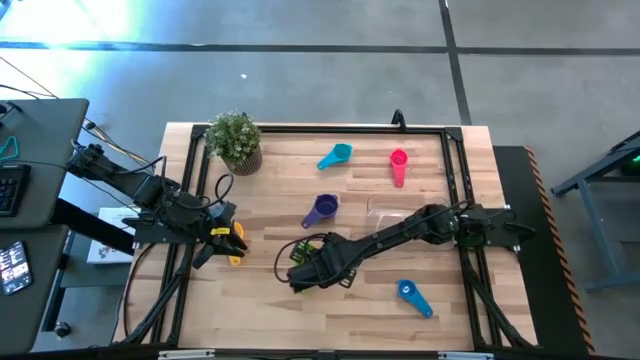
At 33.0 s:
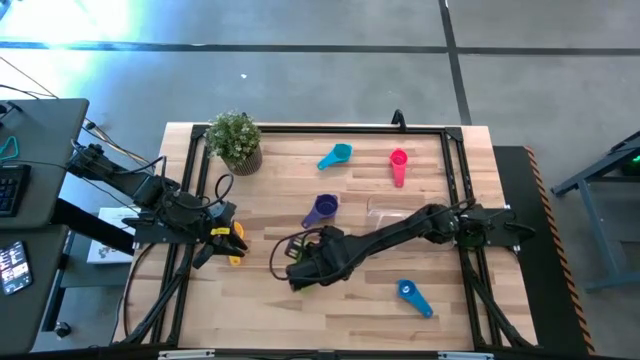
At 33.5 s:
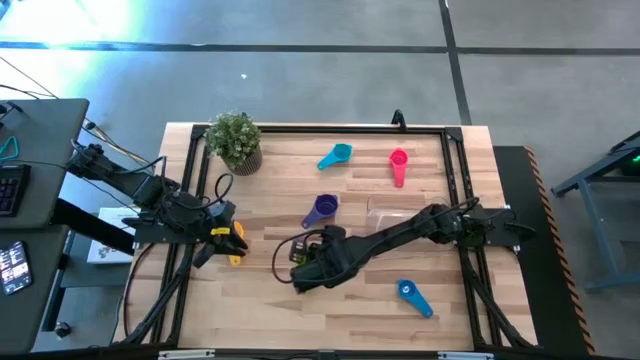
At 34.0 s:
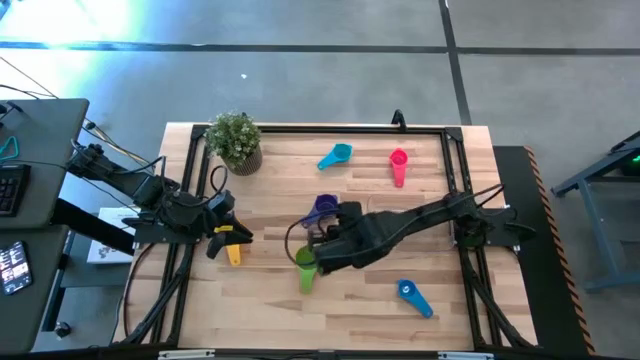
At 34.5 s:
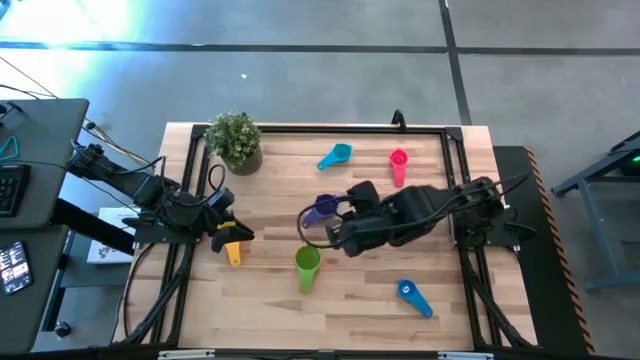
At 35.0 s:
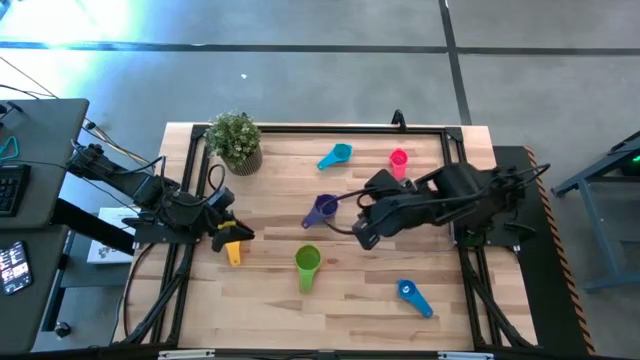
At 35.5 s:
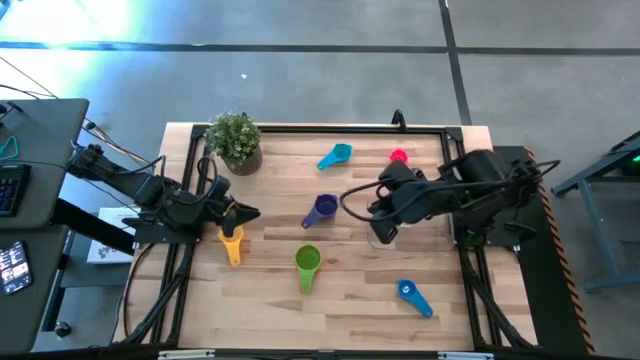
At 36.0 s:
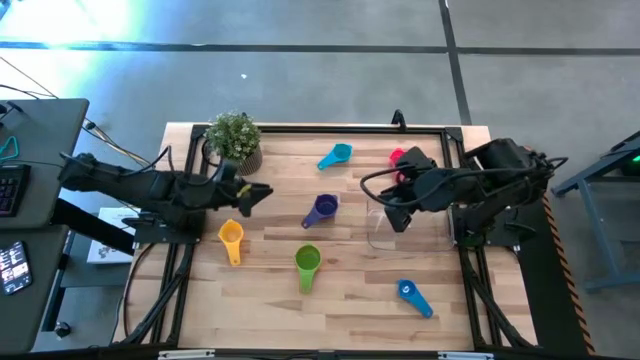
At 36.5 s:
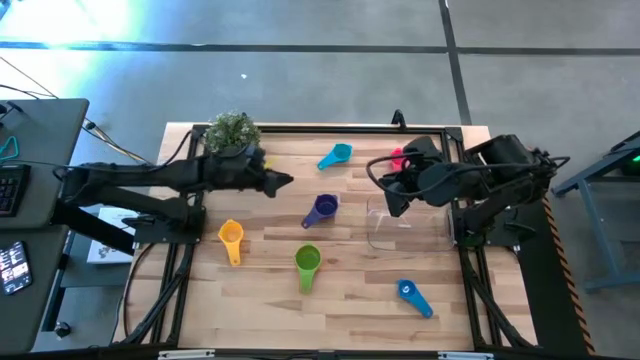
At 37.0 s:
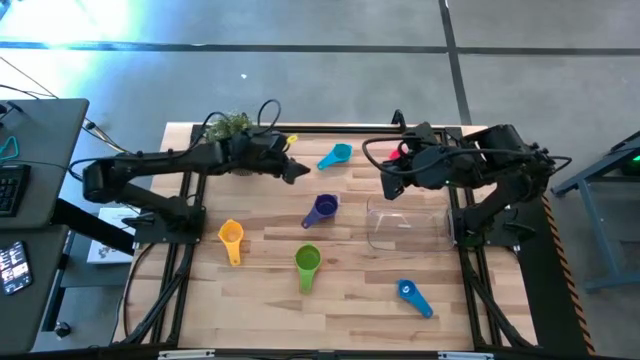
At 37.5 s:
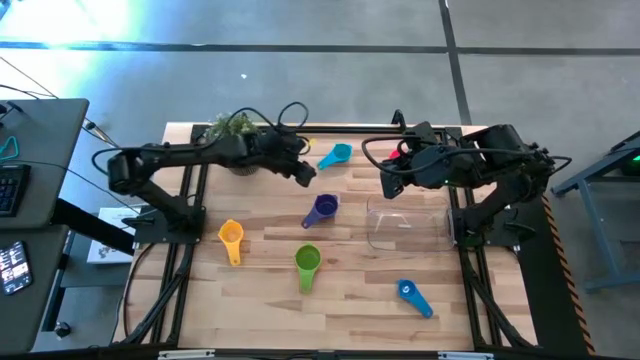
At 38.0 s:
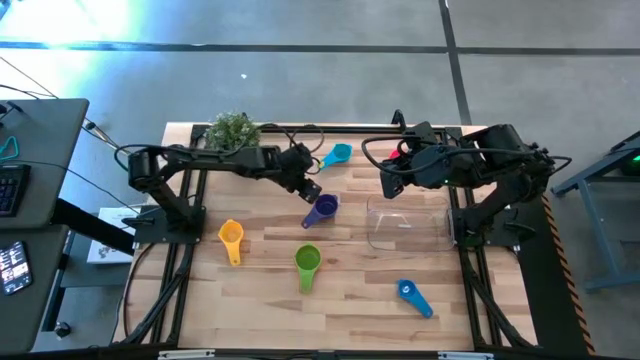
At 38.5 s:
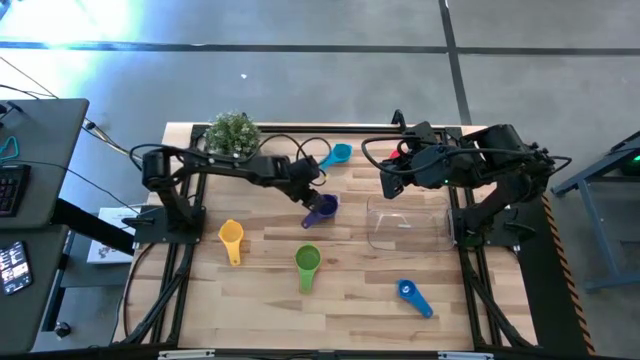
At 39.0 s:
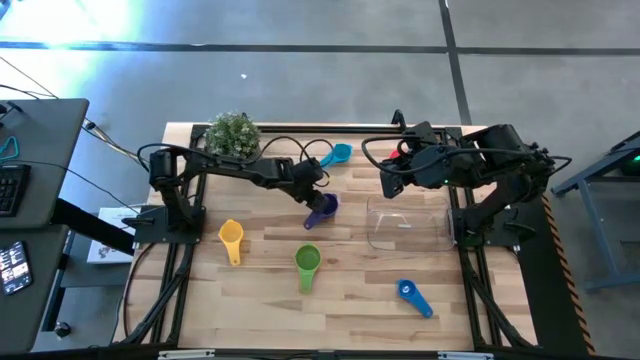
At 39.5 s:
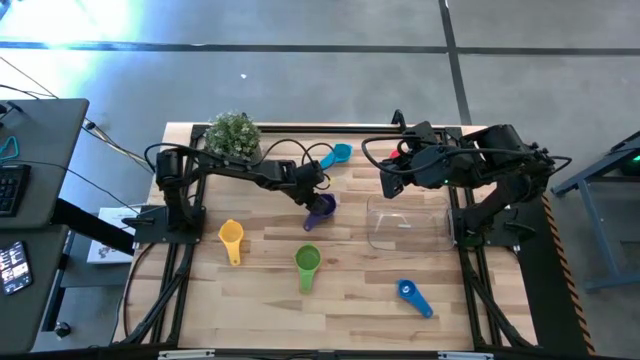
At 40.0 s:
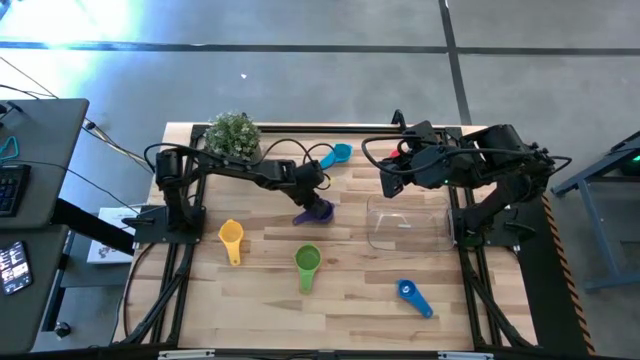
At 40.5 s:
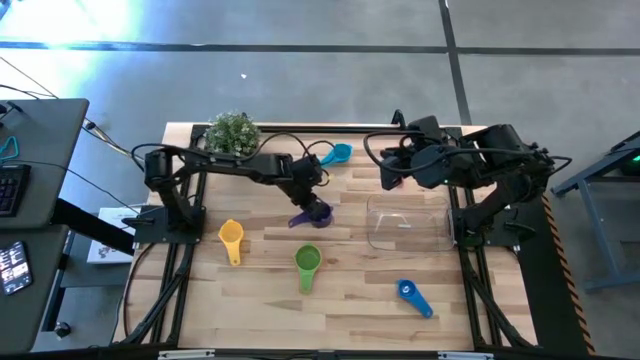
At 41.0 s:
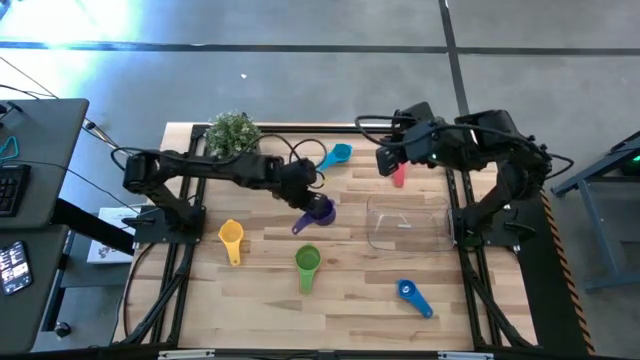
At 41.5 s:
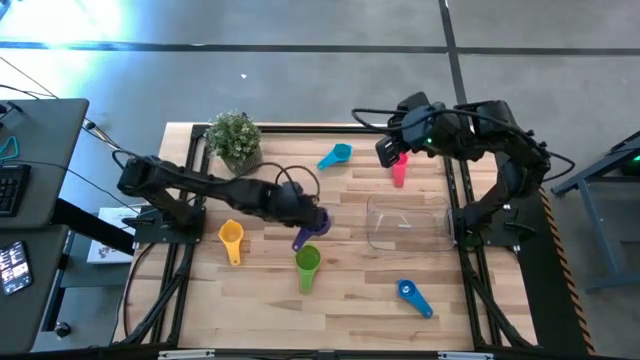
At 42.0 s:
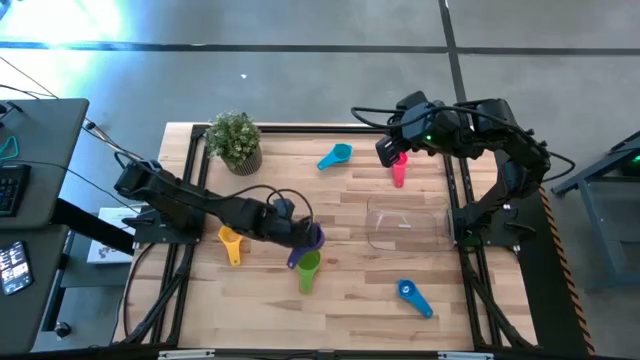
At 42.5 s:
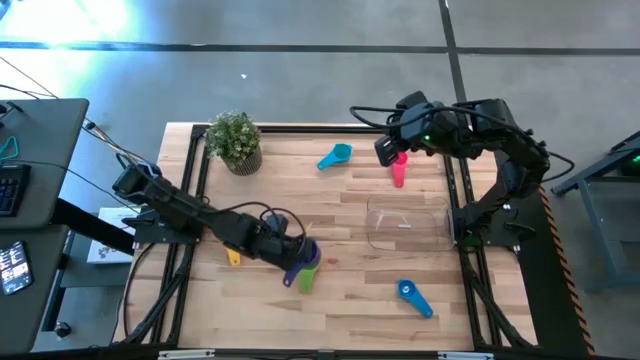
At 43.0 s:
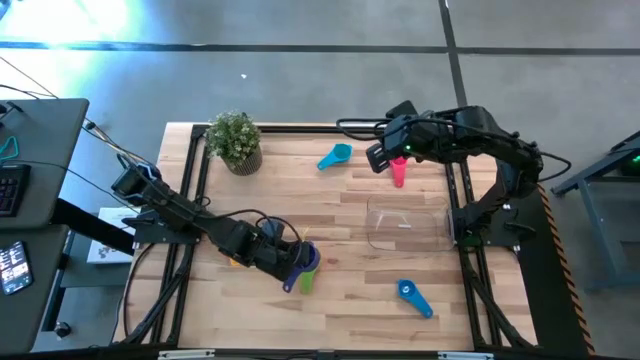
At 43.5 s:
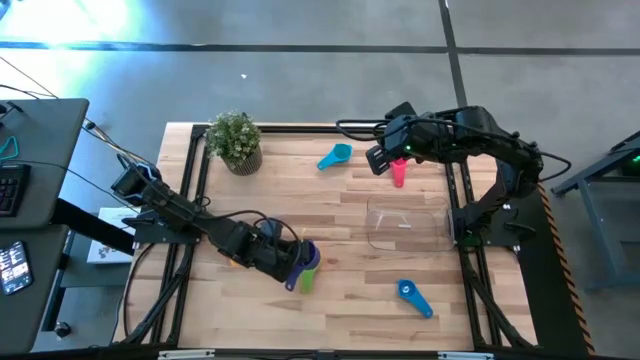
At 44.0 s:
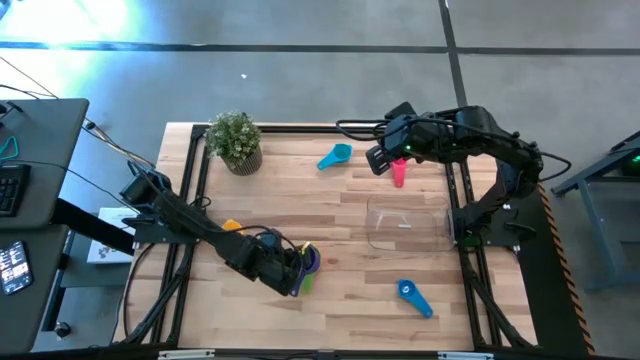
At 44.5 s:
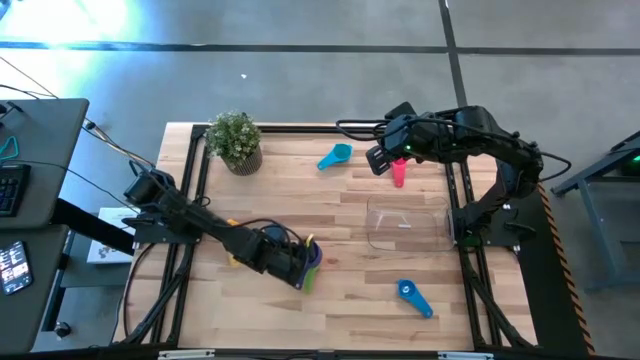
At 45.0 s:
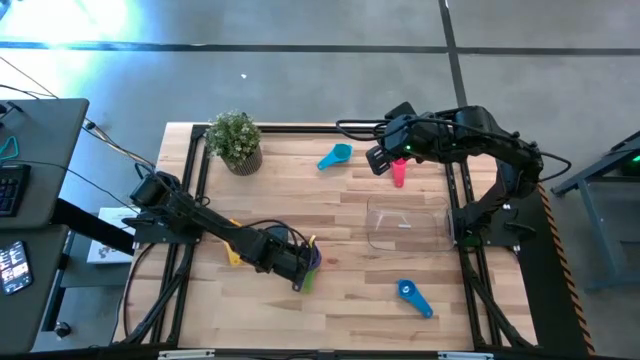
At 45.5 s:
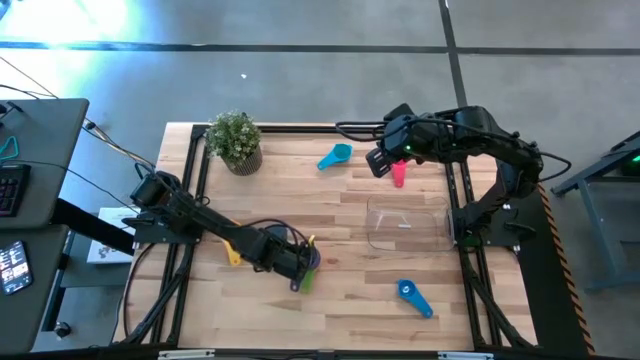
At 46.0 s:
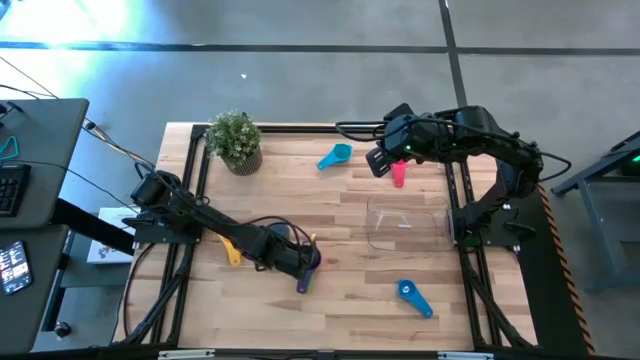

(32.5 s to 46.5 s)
Task: Nest measuring cups in basket
Stack the violet measuring cup on top of the green measuring cup

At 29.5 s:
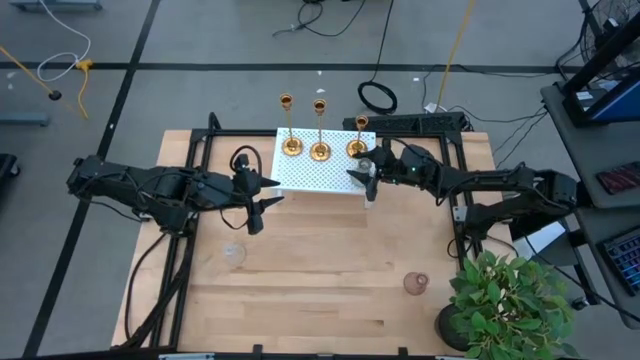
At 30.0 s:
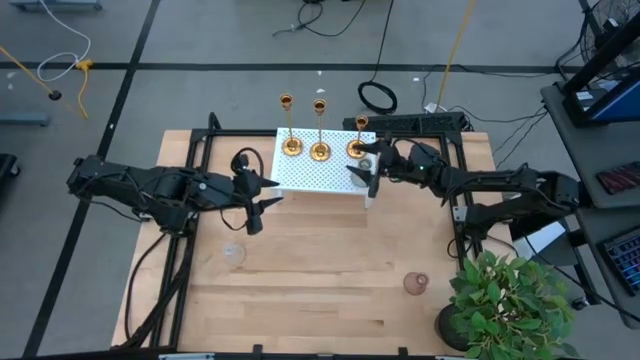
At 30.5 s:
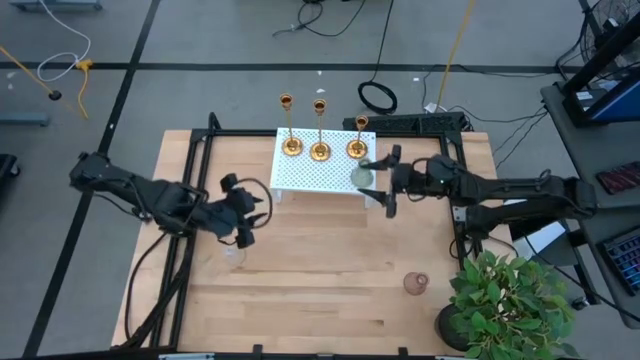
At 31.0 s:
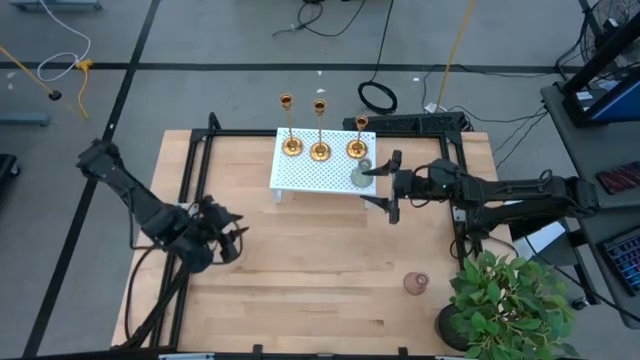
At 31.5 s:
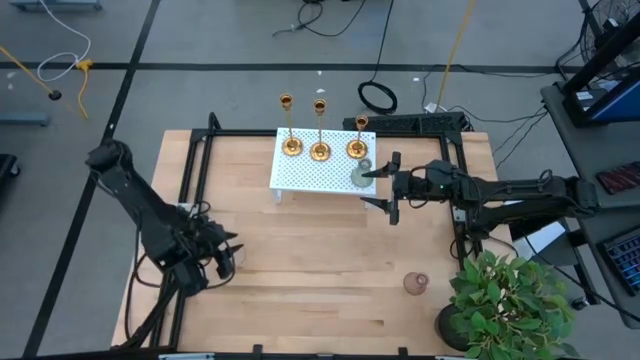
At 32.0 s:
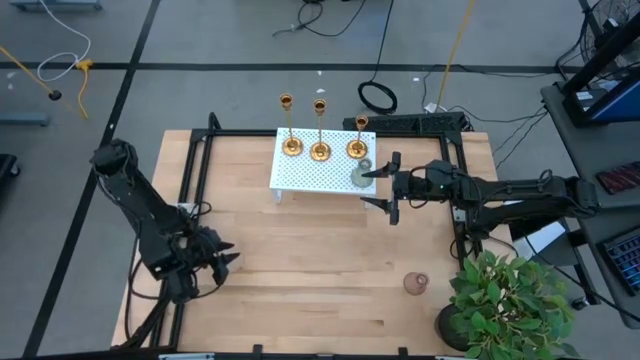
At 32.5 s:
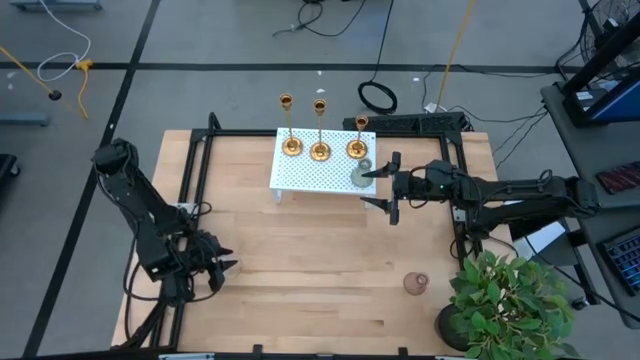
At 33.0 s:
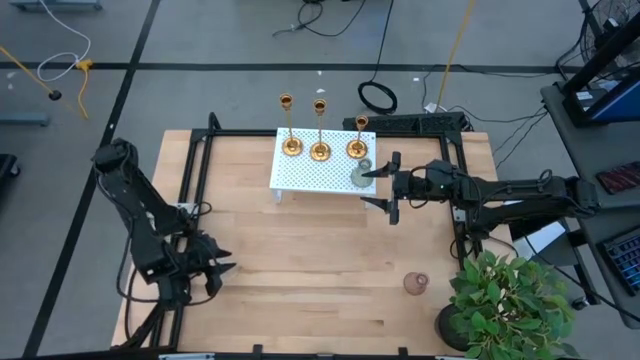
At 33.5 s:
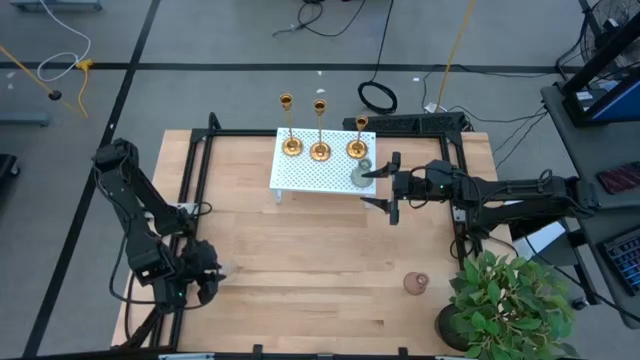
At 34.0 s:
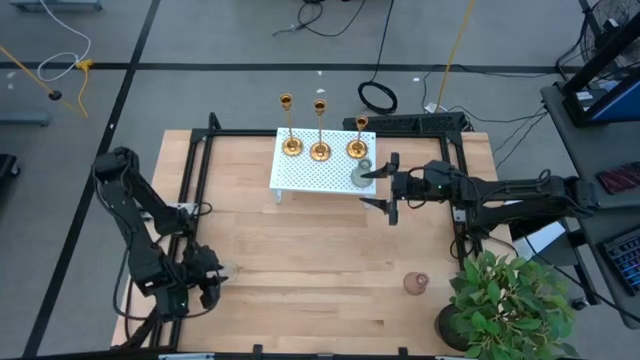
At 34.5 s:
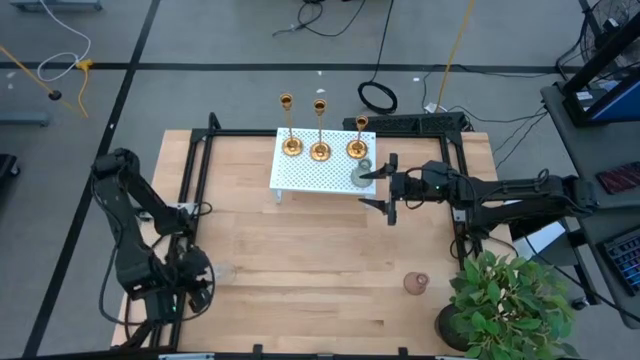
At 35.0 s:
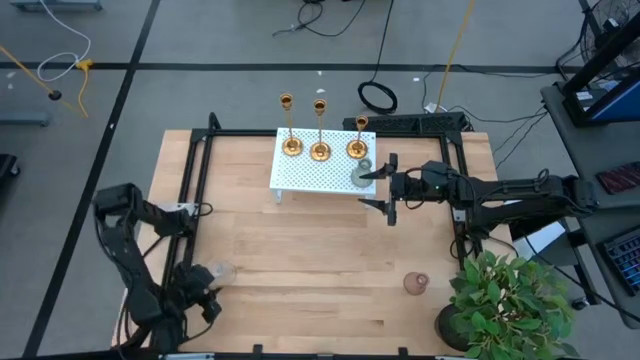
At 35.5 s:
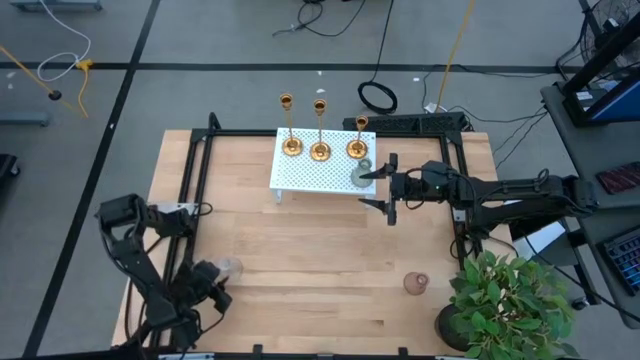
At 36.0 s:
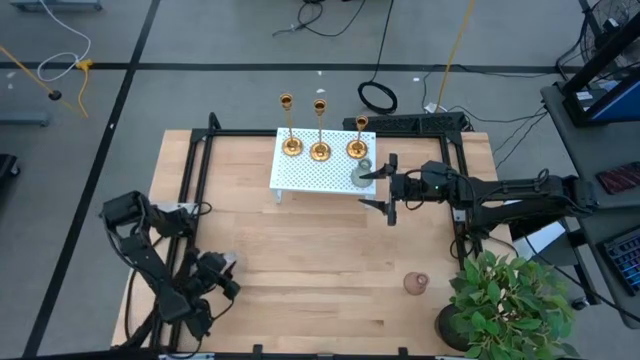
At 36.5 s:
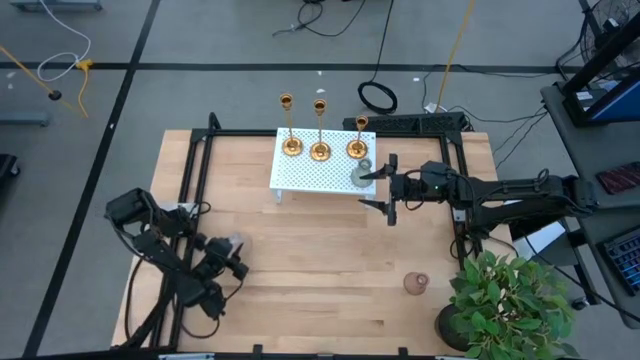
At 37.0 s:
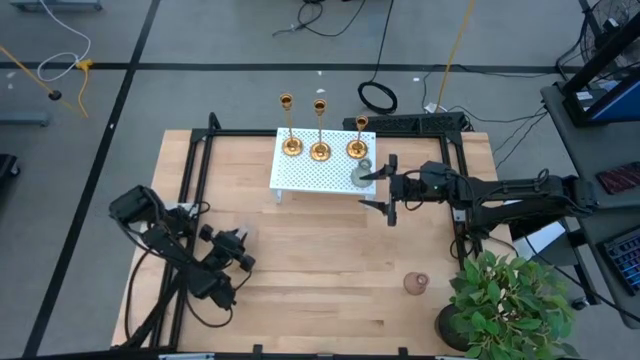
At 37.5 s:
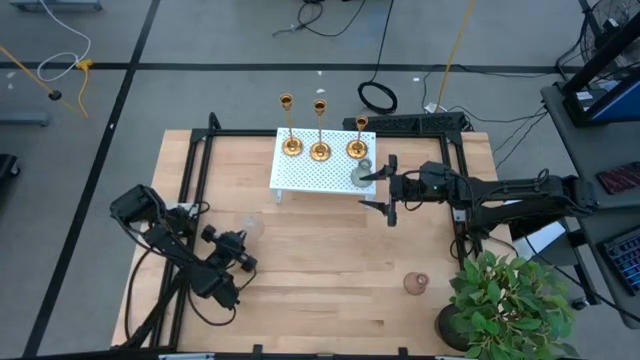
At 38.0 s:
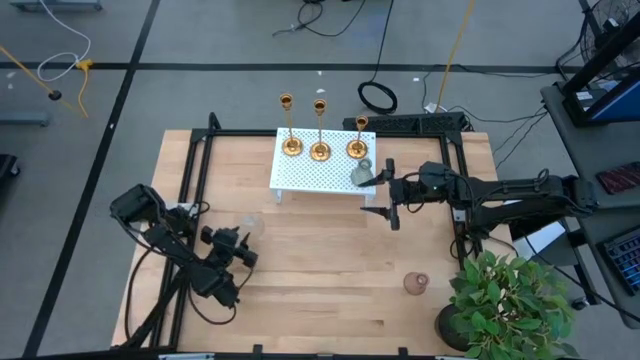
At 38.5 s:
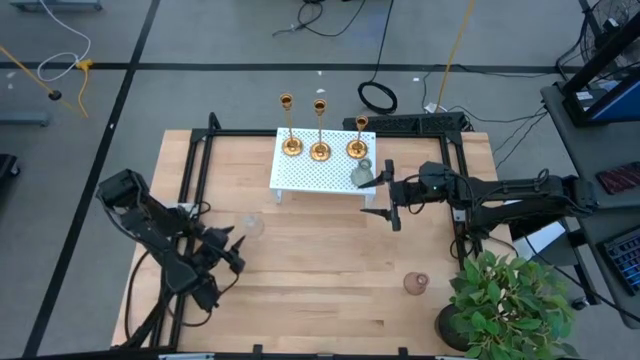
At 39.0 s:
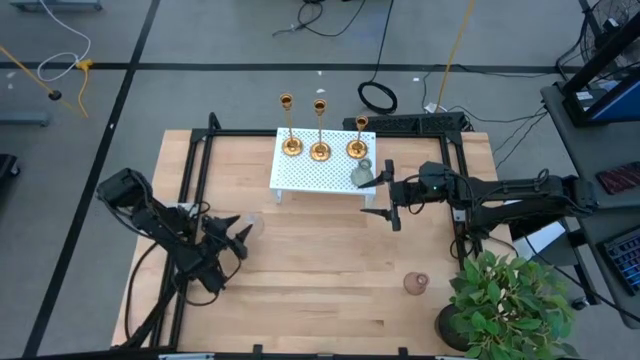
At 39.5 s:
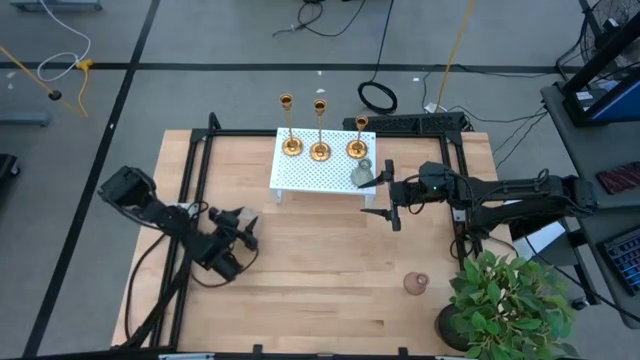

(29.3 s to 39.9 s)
Task: Pick & Place candle stick holders
Put the transparent vase on the shelf
